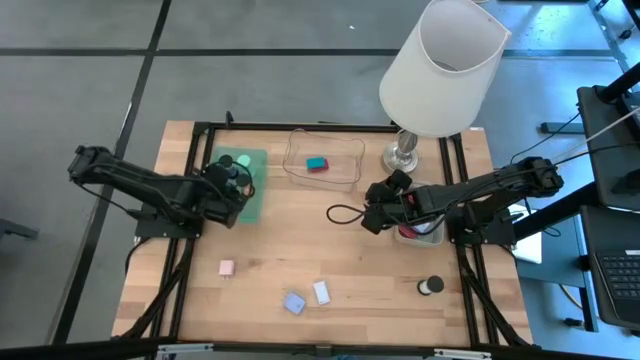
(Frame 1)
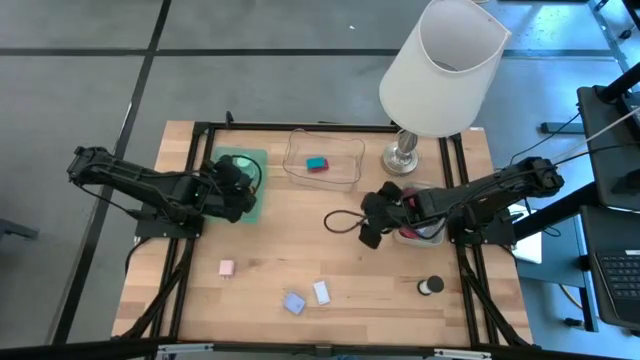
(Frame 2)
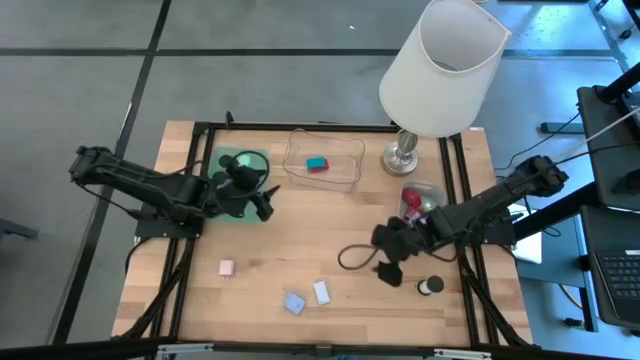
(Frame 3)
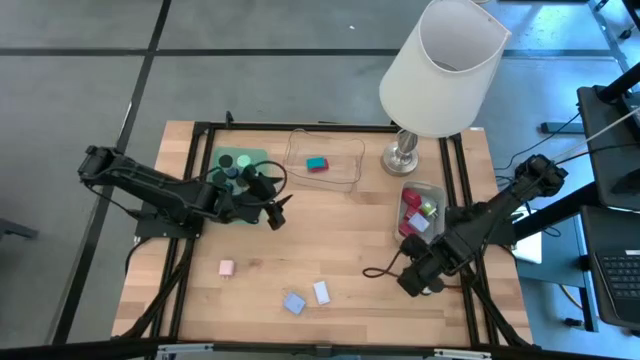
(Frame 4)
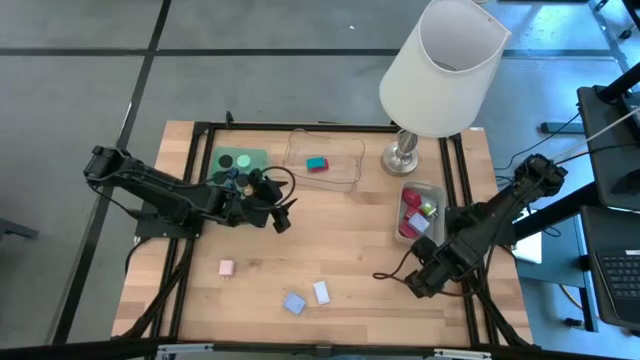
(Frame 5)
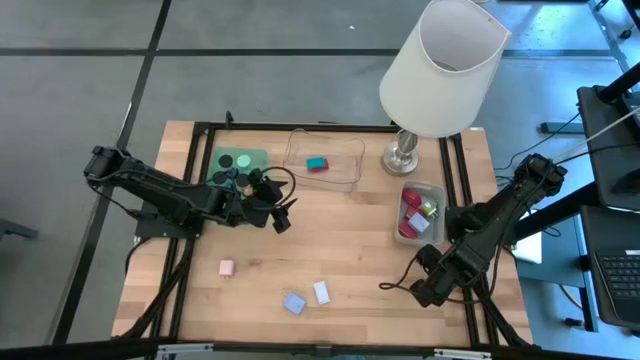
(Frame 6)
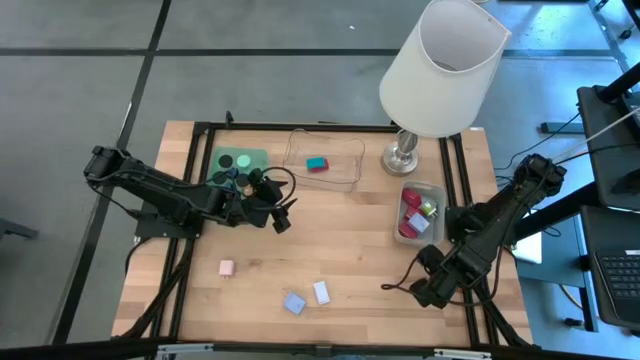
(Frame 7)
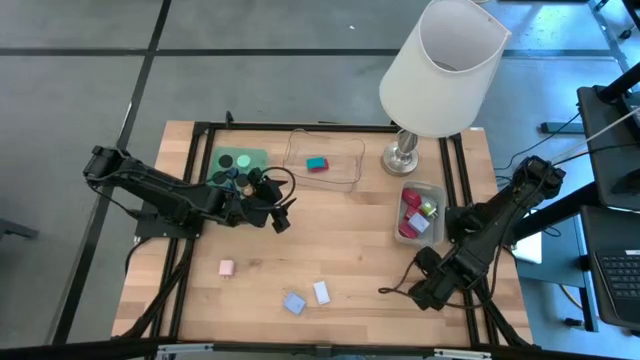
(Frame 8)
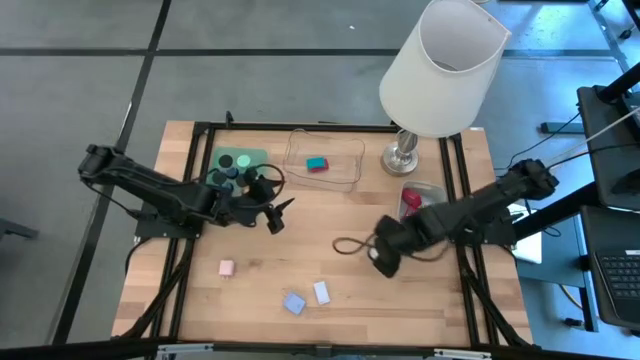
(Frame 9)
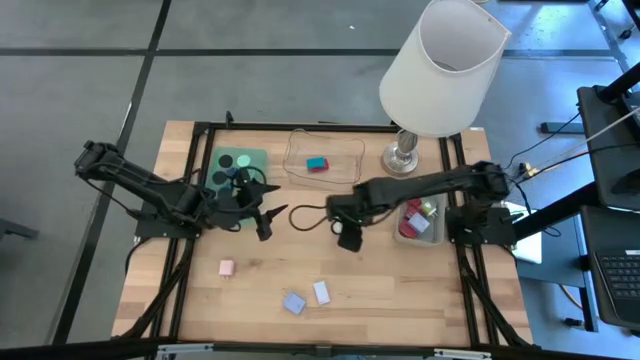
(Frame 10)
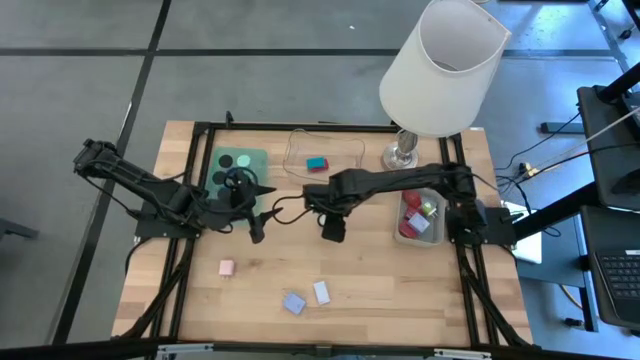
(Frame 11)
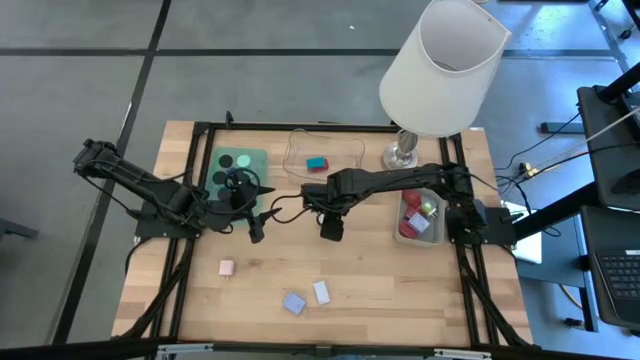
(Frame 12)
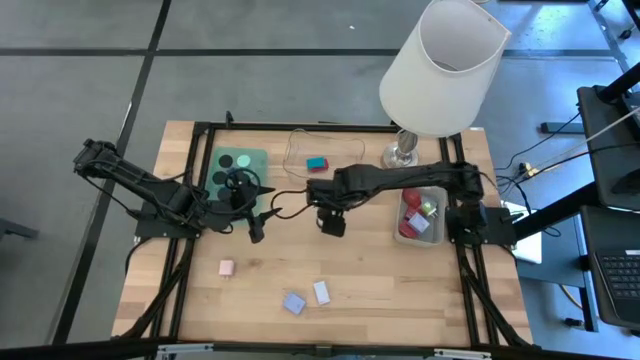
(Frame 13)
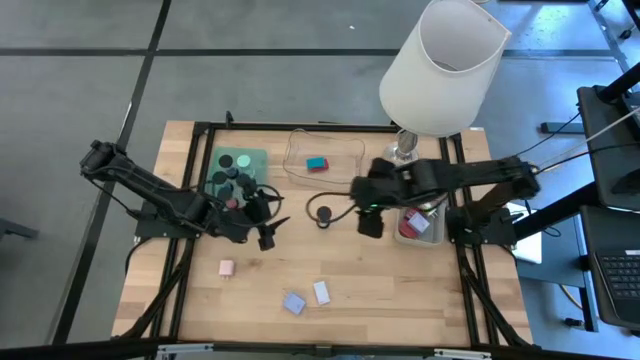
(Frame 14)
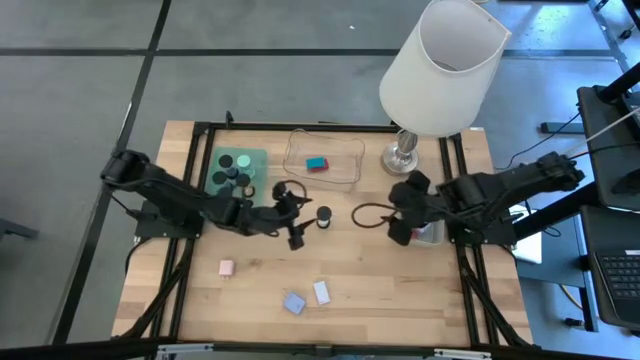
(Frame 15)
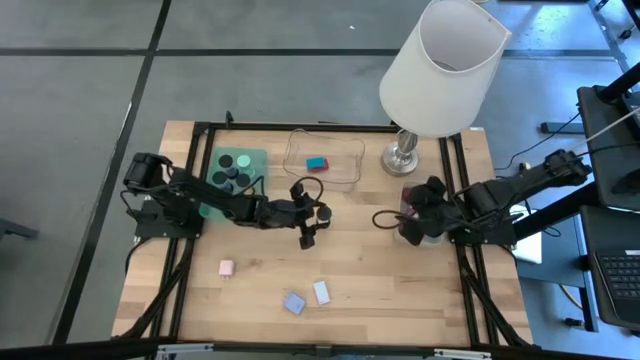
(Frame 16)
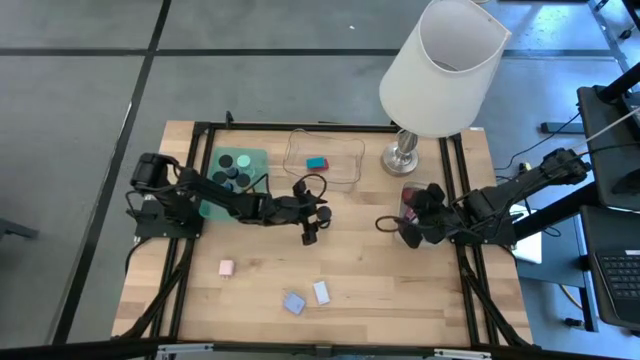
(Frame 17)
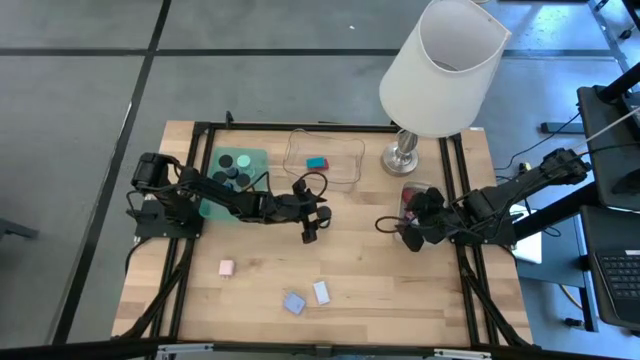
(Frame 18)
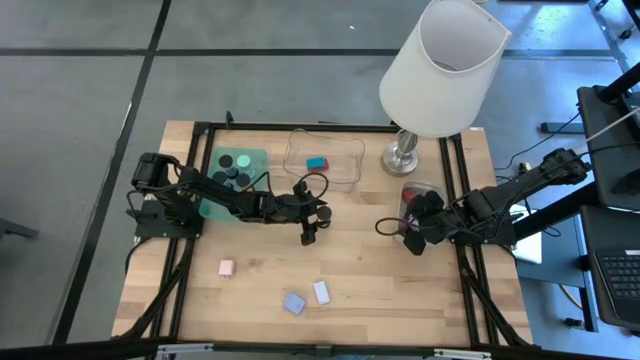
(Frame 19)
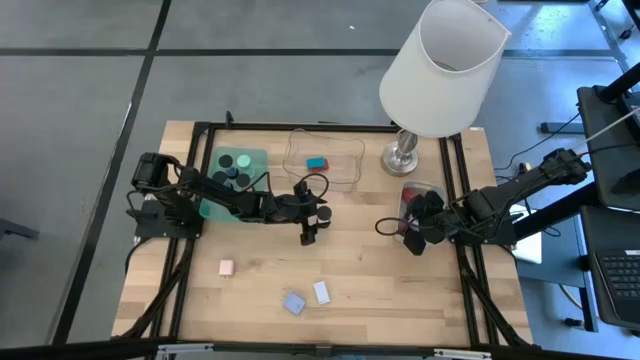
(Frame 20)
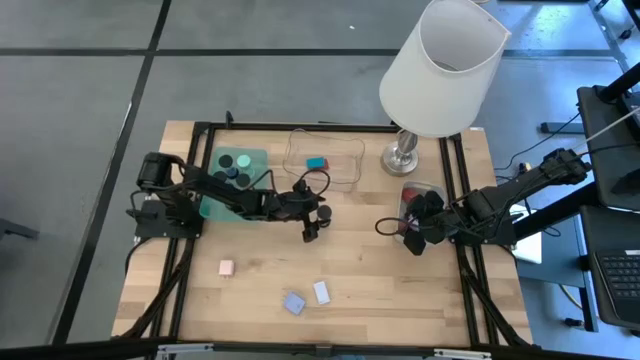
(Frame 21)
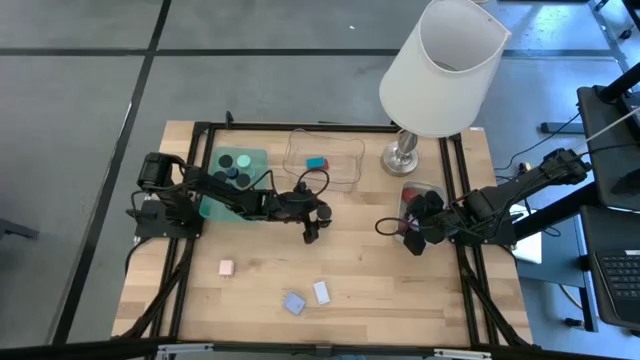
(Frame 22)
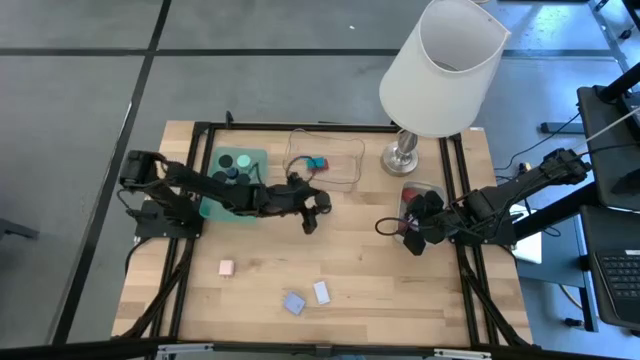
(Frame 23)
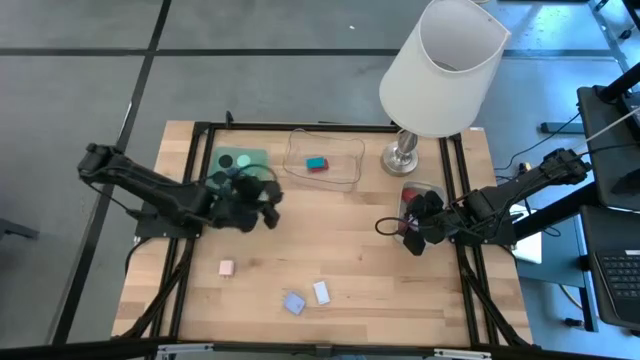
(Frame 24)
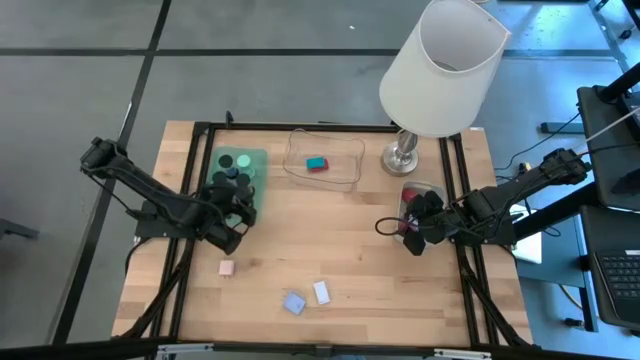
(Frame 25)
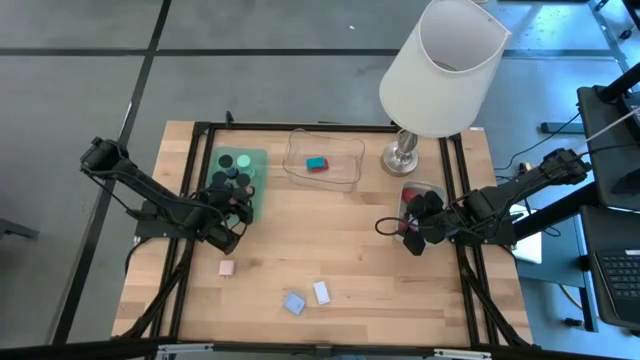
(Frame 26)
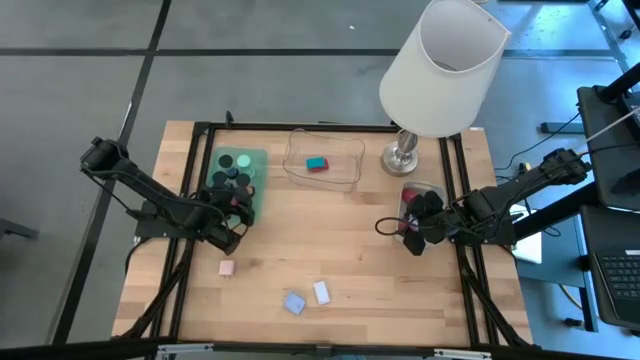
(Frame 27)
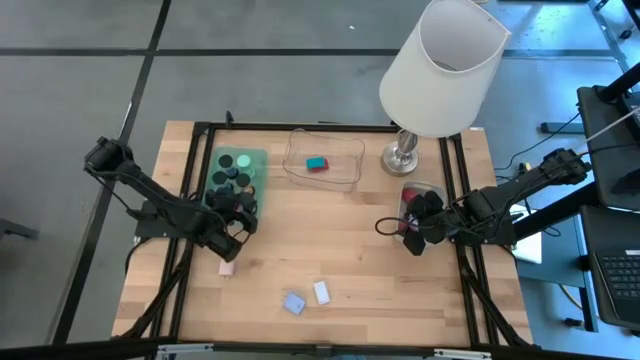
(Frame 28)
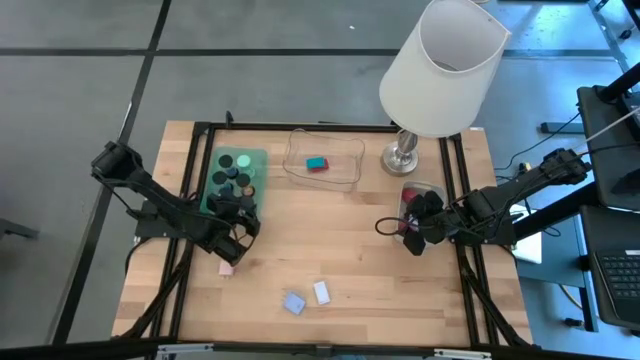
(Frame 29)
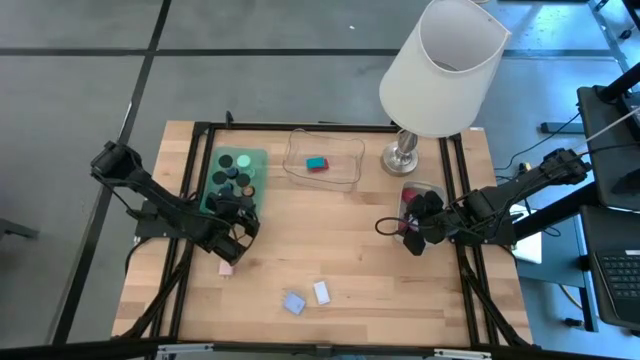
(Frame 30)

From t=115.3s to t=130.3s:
Task: Pick & Place Office items
Put the white hourglass into the blue bin

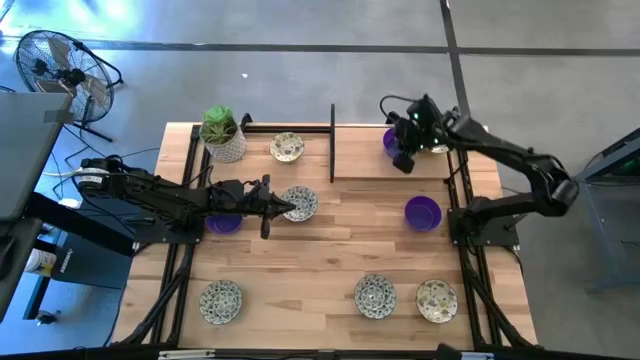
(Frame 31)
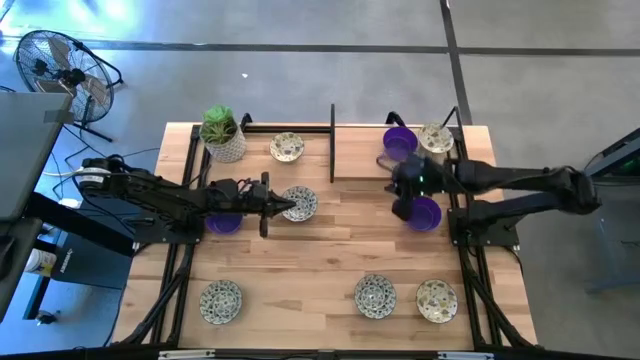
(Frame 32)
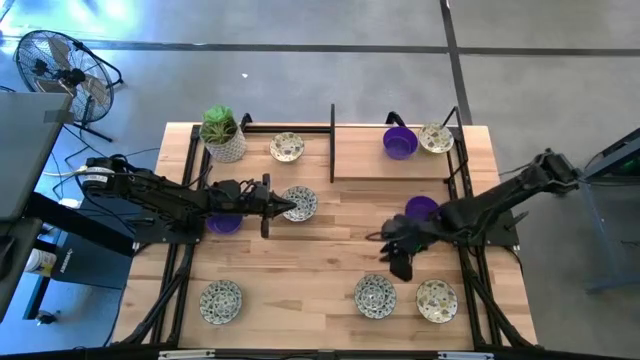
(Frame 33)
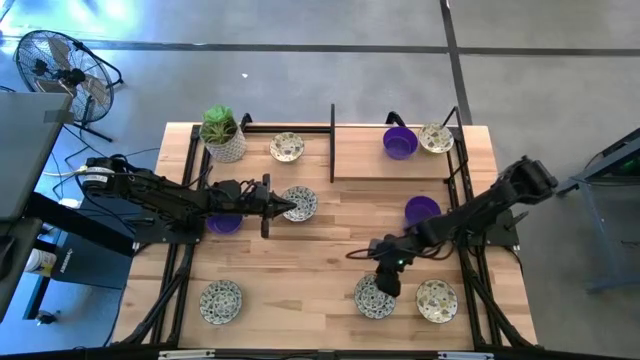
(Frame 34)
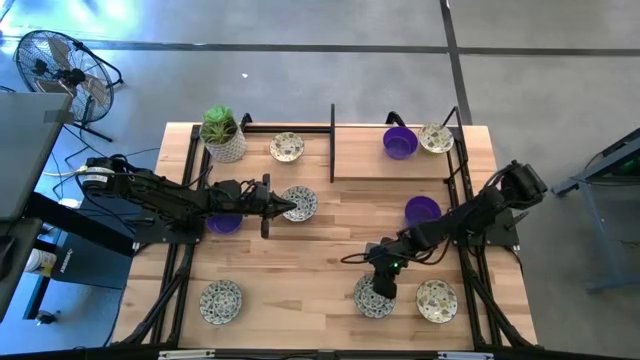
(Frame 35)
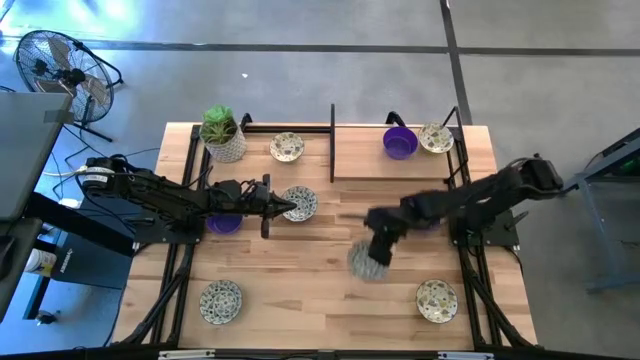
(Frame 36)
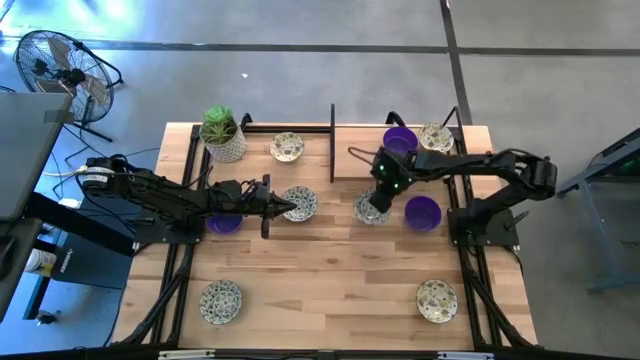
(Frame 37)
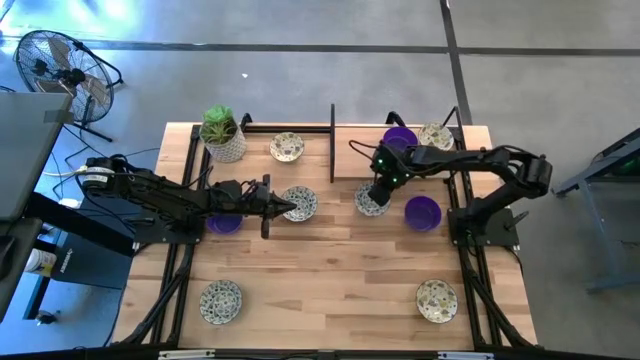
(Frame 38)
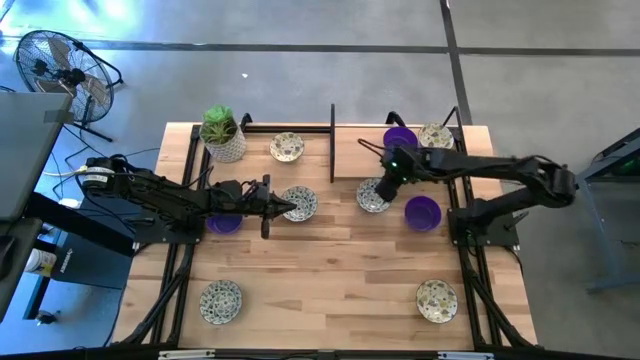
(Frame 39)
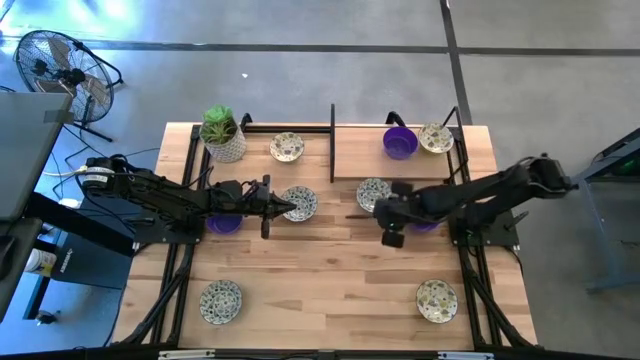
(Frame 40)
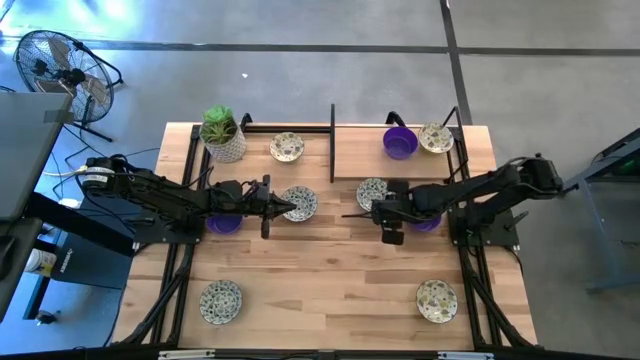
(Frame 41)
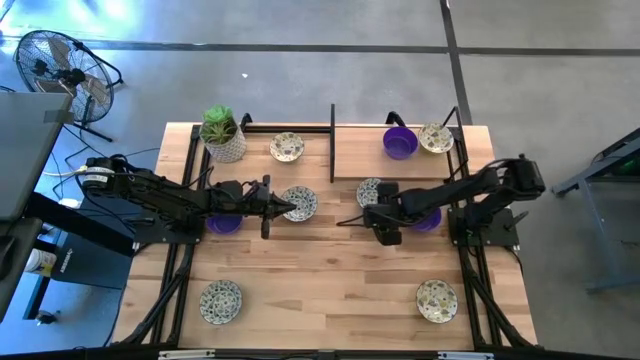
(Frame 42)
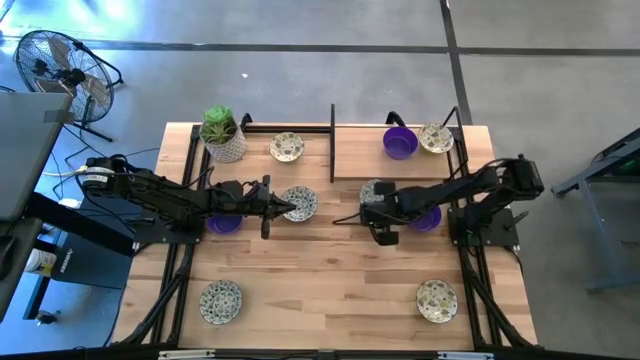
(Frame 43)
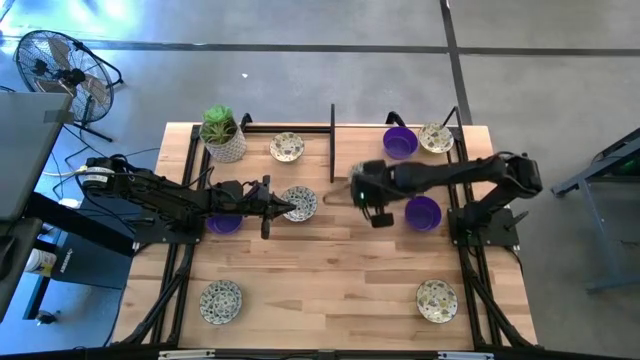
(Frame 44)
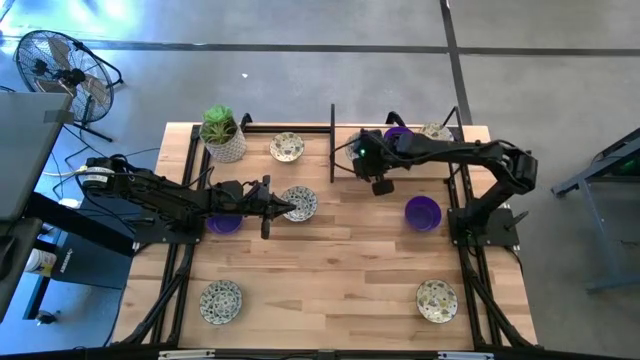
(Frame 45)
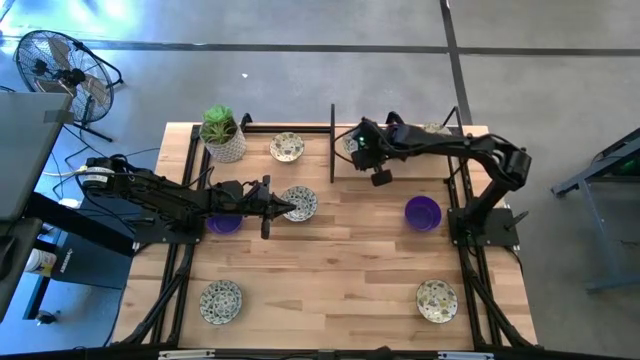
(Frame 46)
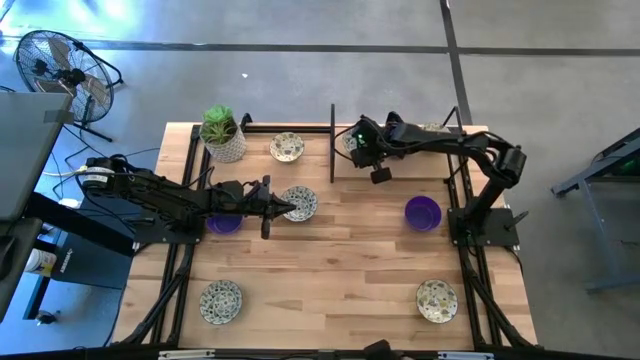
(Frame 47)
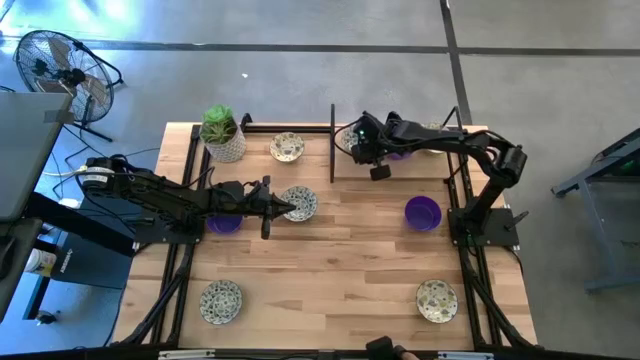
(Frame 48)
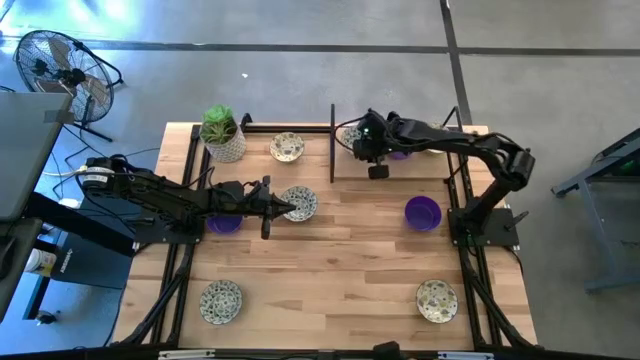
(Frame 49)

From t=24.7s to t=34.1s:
Task: Pick & Place Mini bowls
Put the bottom right light blue bowl on top of the shelf
